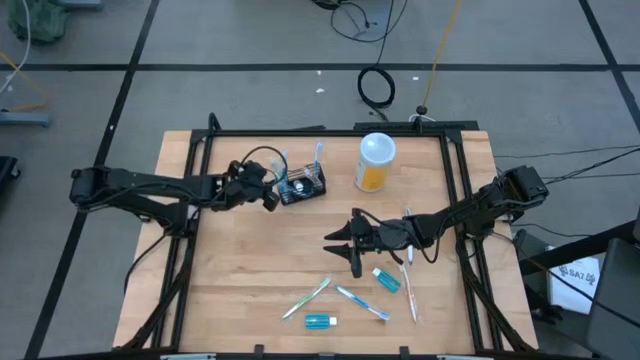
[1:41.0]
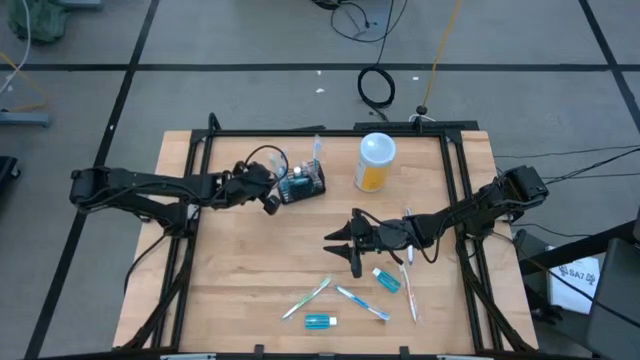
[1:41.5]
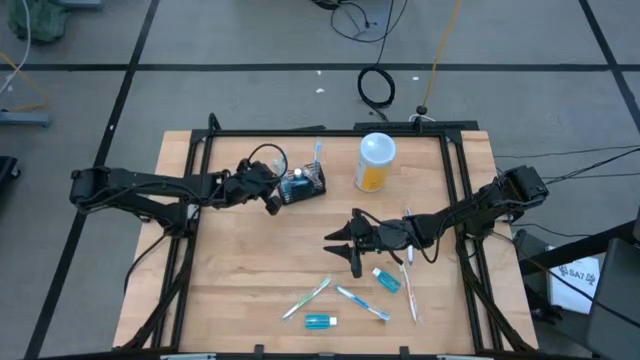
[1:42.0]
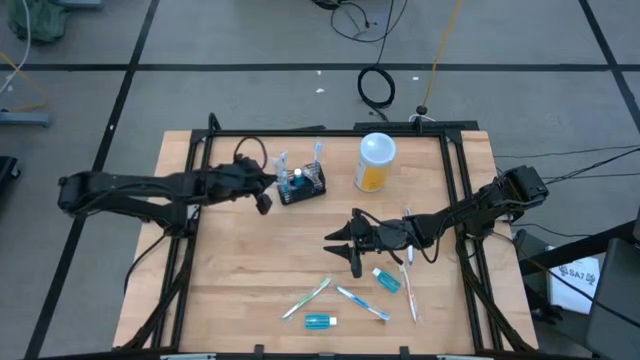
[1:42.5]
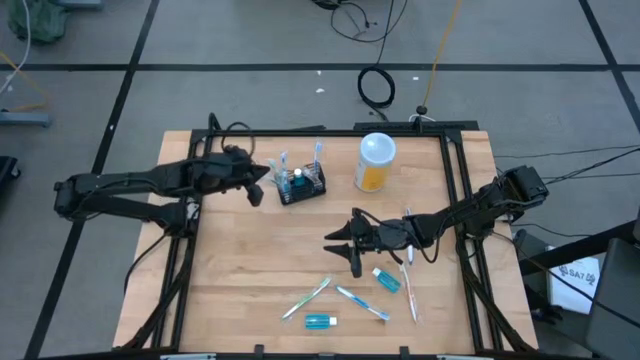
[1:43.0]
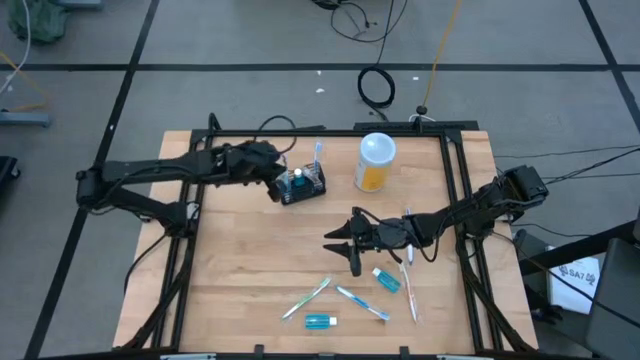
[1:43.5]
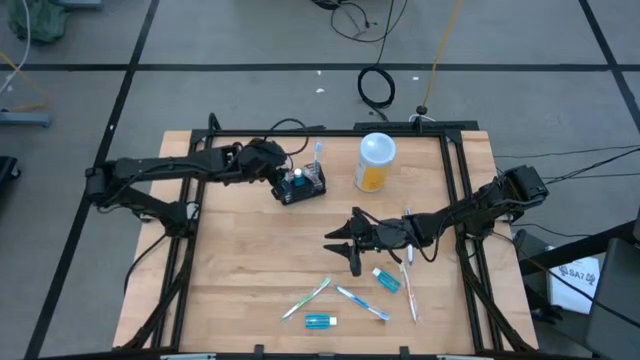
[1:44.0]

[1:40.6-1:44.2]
Task: Pick & Place toothbrushing station
Adjust the blue toothbrush

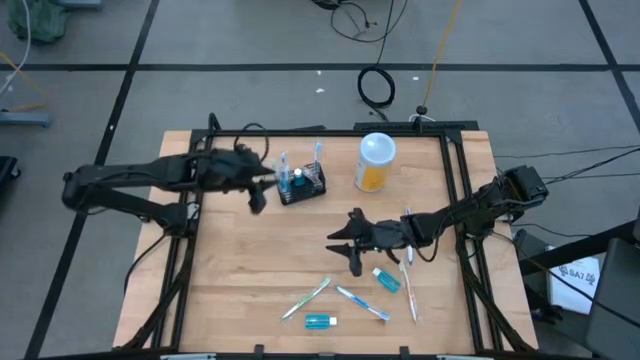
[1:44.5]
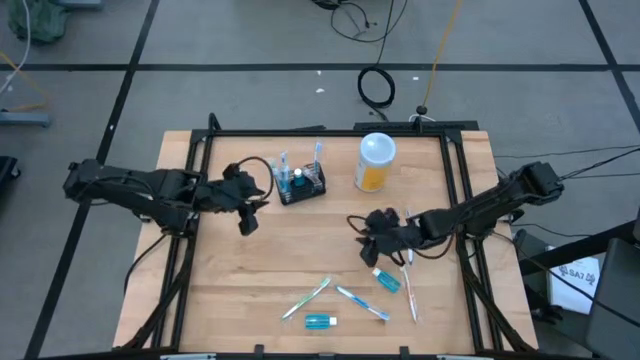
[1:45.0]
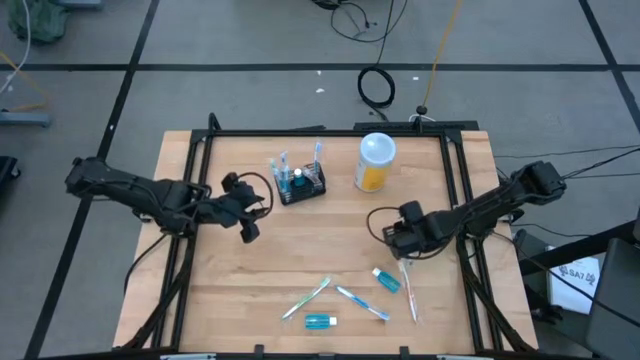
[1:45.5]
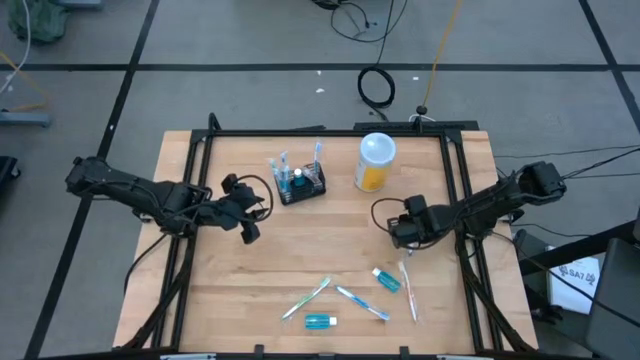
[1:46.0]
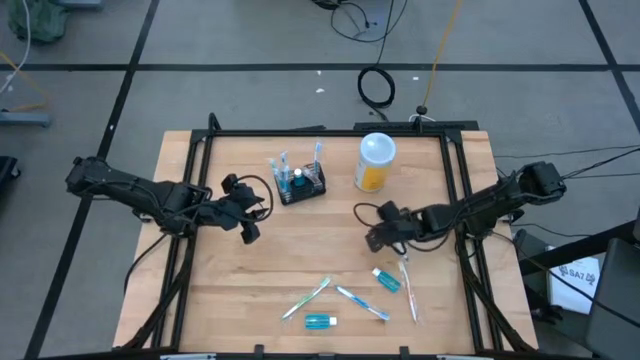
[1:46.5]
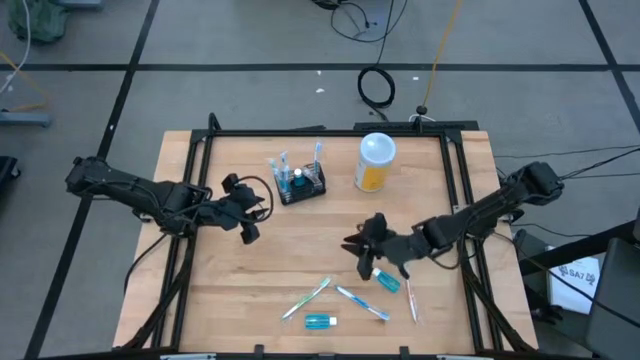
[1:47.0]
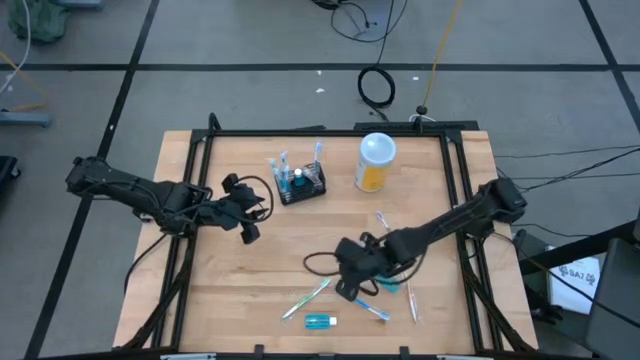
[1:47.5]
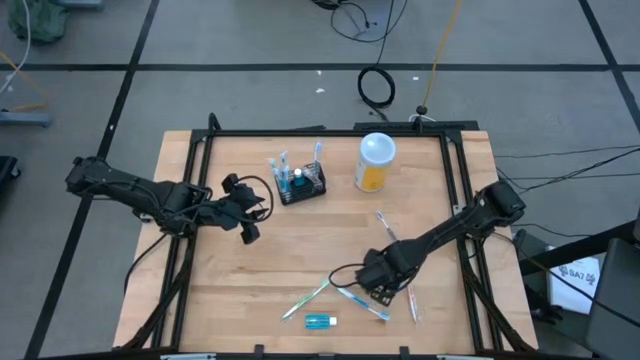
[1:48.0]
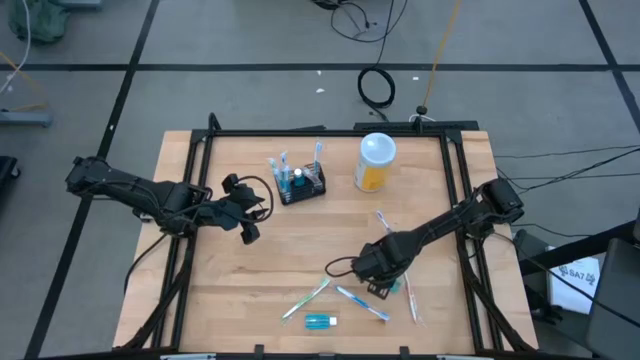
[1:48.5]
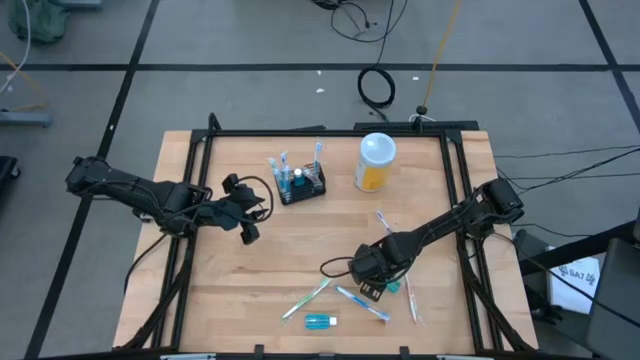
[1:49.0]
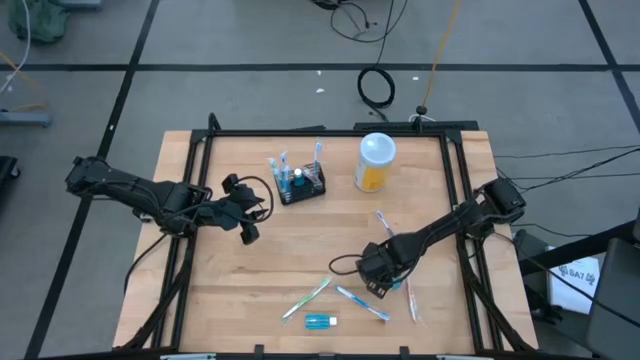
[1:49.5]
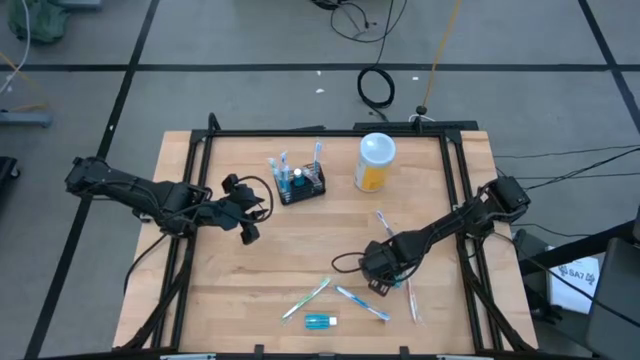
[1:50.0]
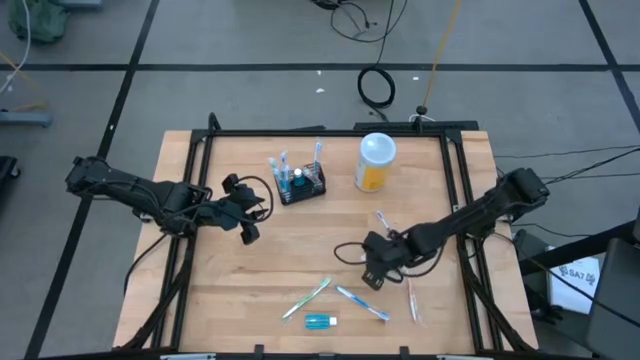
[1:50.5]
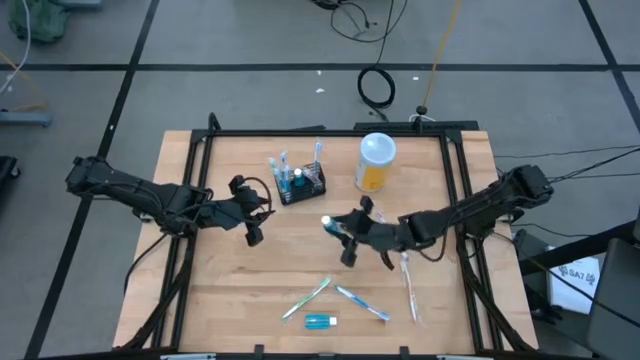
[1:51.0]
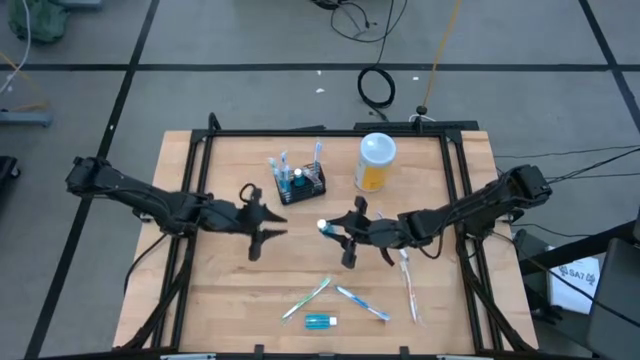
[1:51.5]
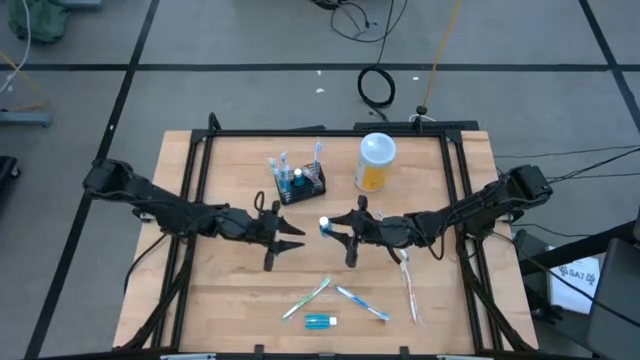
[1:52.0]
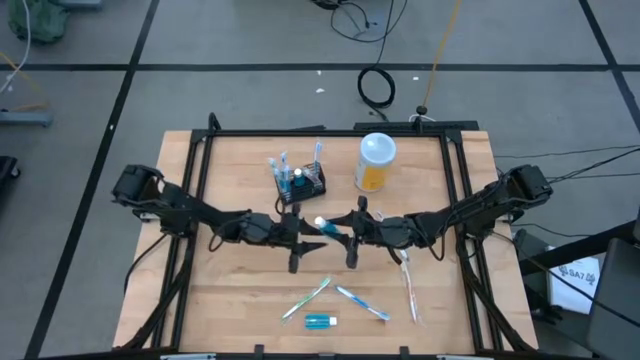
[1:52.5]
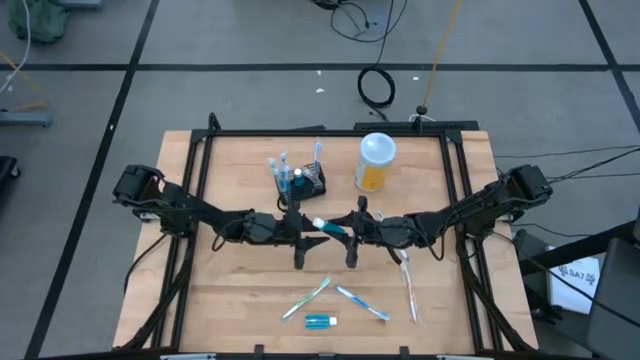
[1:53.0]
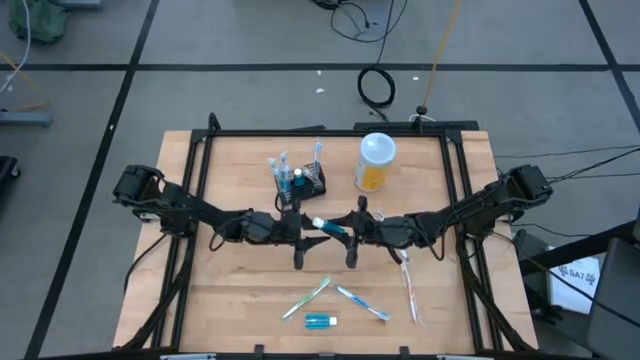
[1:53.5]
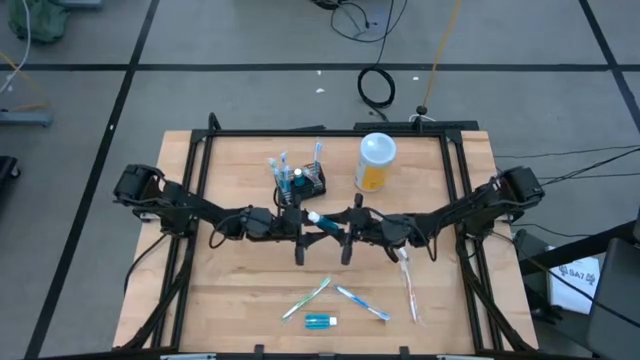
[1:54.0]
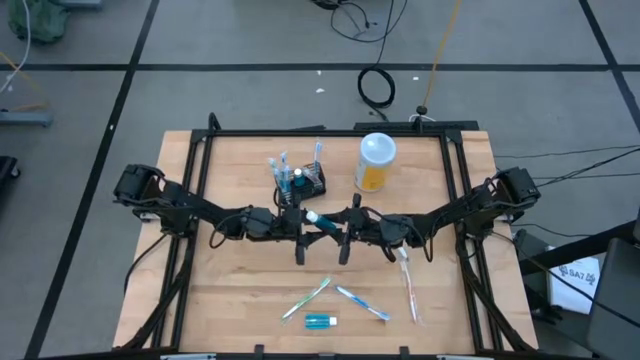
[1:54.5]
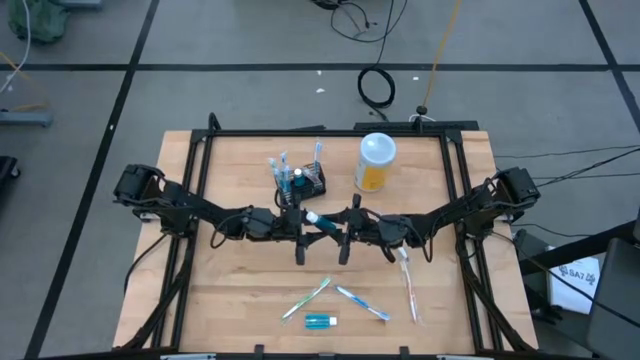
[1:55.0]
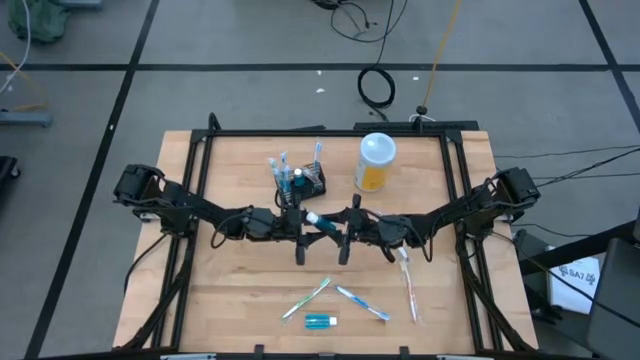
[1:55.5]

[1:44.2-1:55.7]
Put the blue mouthwash into the black mesh organizer

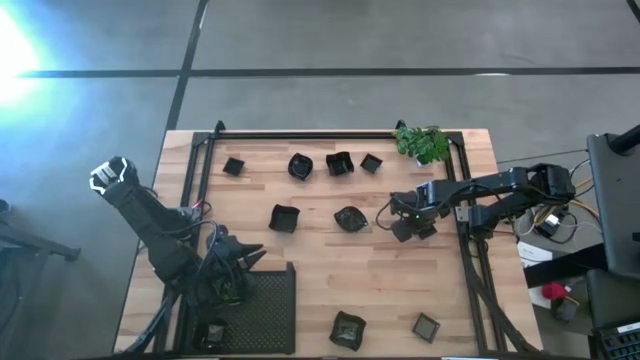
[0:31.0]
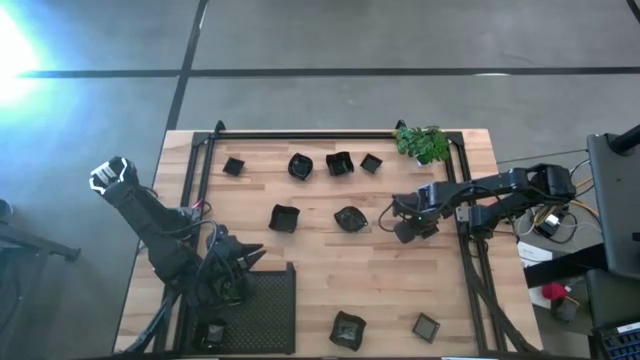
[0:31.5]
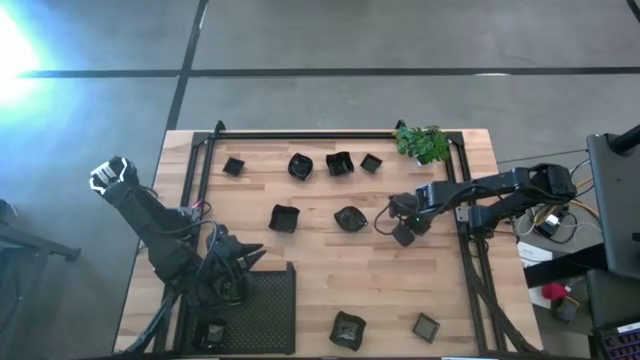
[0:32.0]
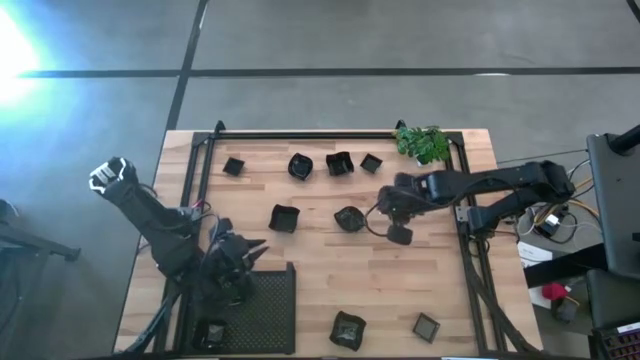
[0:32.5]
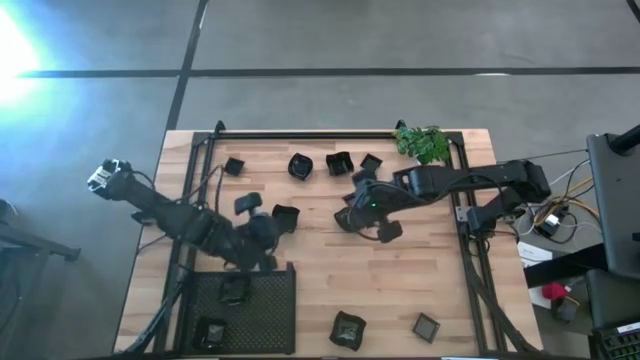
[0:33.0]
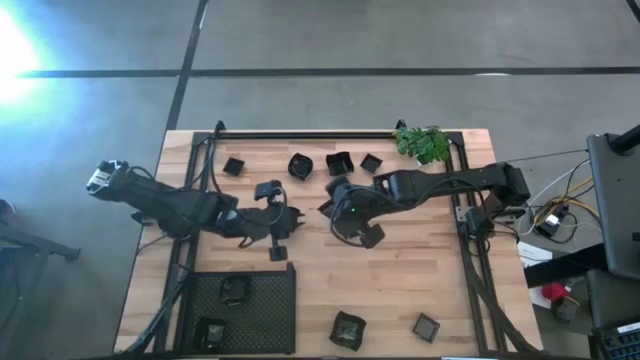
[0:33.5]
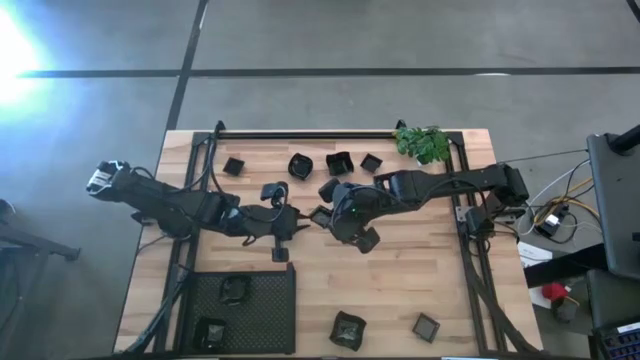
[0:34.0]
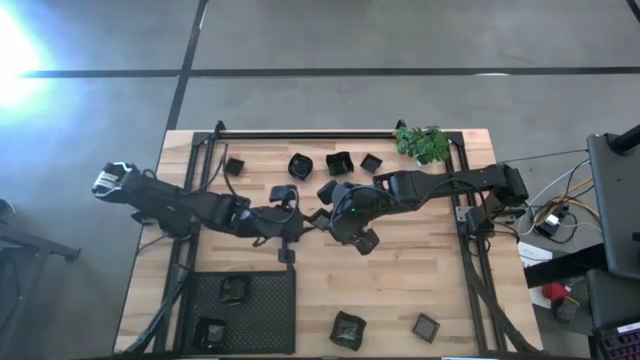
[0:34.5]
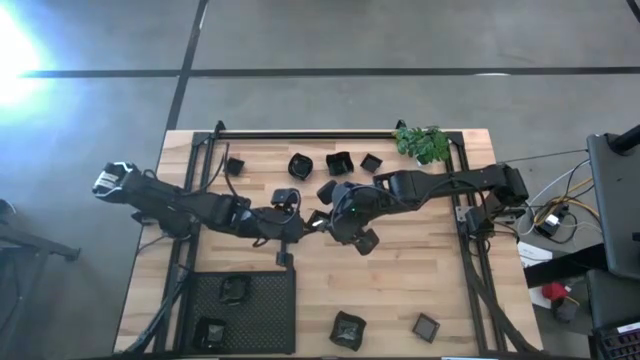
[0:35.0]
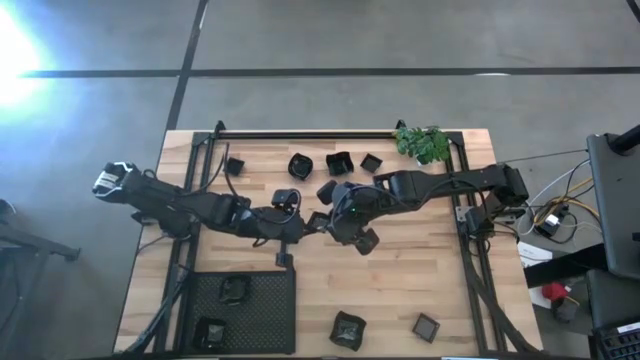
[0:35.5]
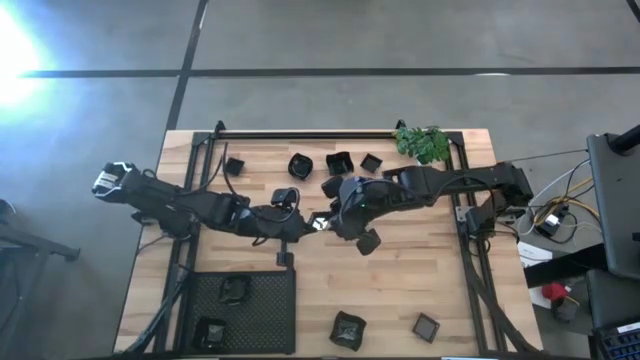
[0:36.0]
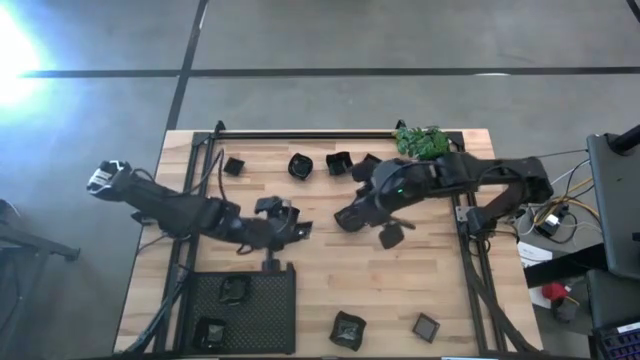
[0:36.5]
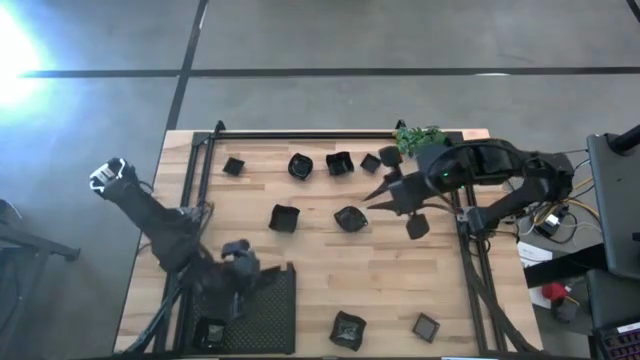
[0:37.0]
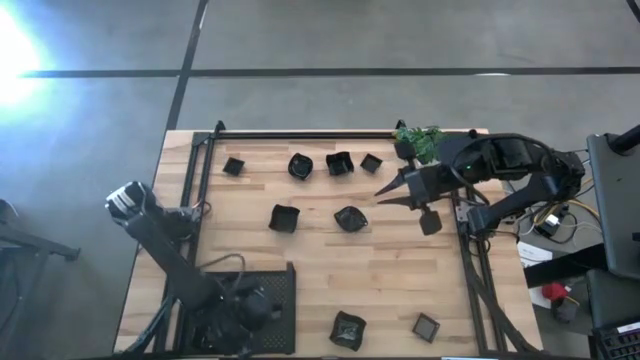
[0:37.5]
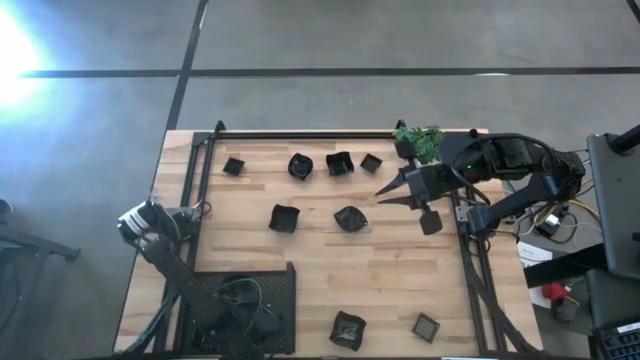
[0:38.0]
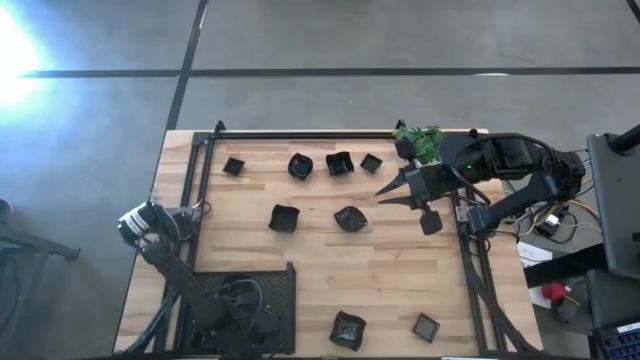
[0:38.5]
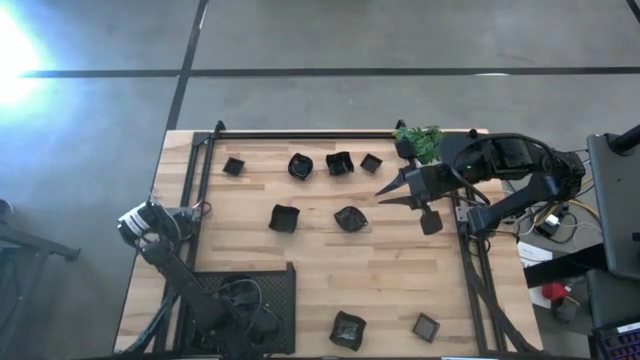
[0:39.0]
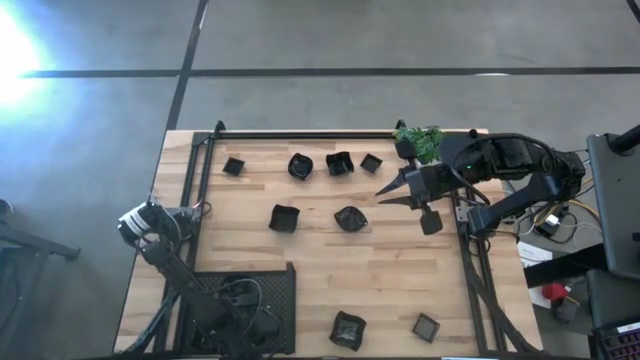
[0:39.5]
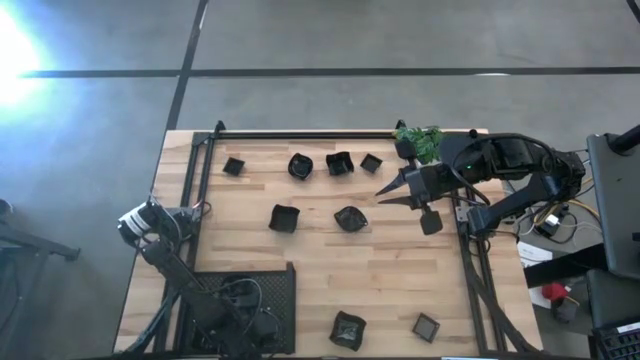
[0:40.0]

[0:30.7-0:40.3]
Task: Pick & Place Mini shaped plates
Put the black square plate on the shelf
